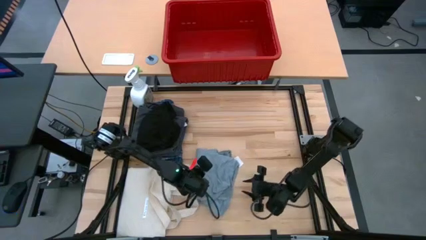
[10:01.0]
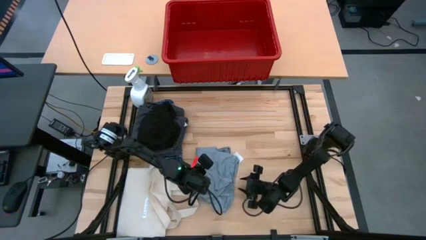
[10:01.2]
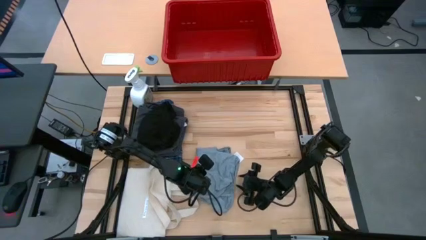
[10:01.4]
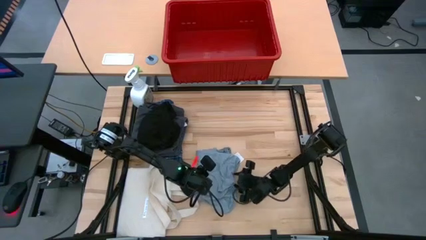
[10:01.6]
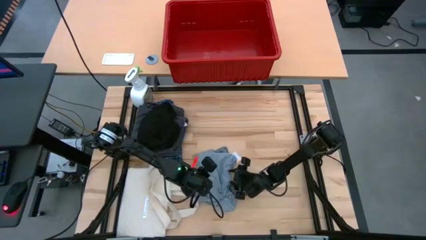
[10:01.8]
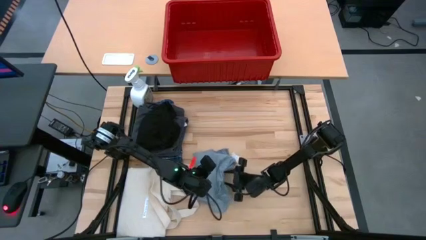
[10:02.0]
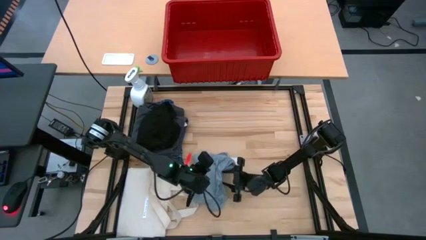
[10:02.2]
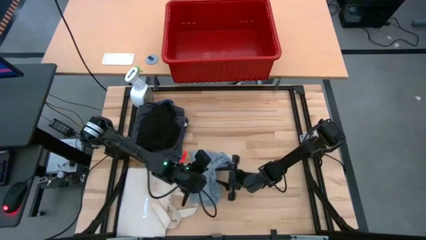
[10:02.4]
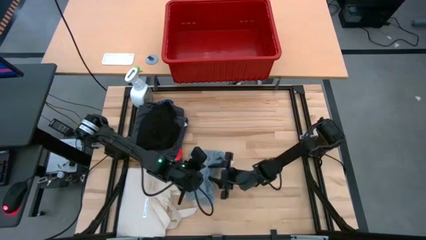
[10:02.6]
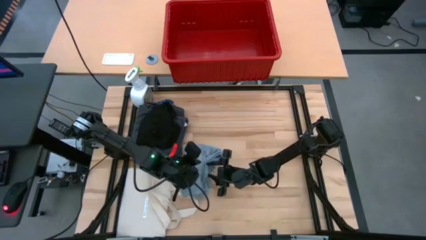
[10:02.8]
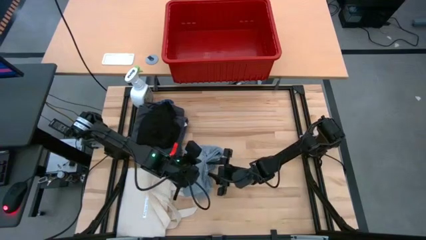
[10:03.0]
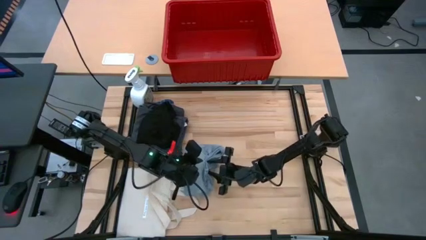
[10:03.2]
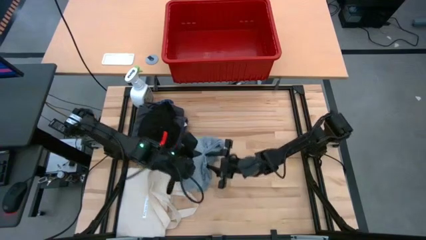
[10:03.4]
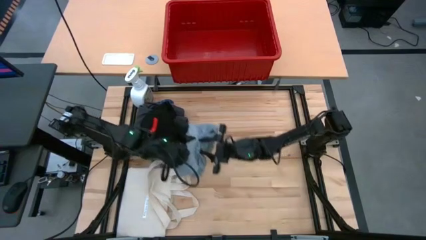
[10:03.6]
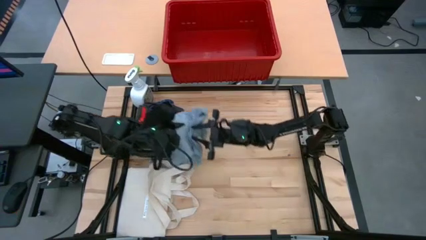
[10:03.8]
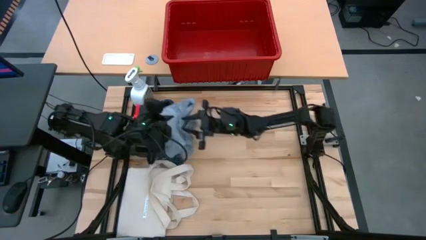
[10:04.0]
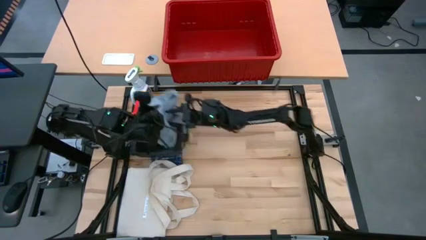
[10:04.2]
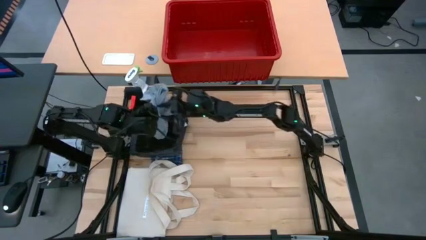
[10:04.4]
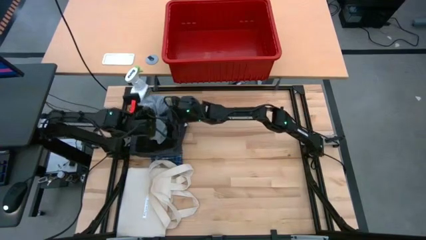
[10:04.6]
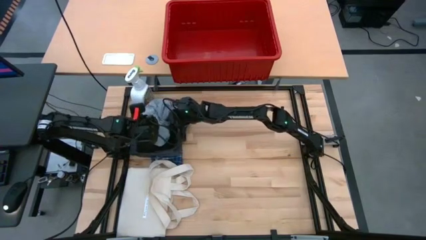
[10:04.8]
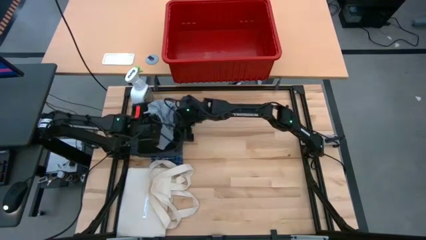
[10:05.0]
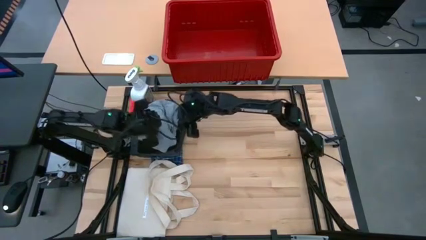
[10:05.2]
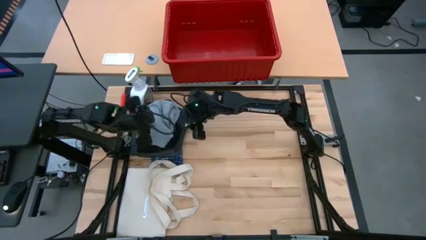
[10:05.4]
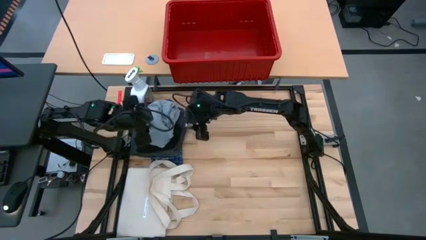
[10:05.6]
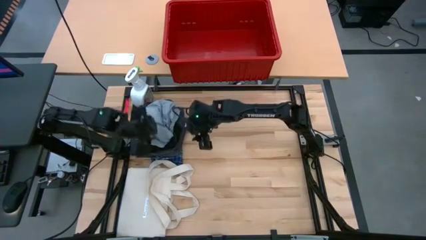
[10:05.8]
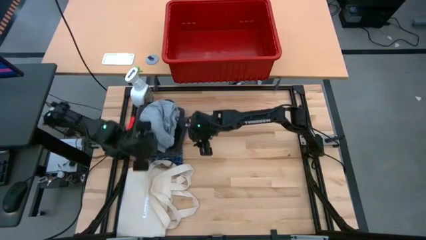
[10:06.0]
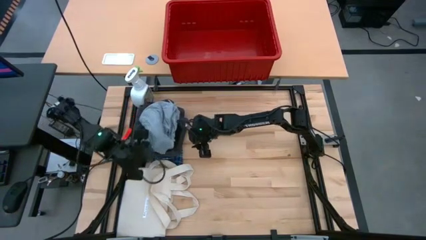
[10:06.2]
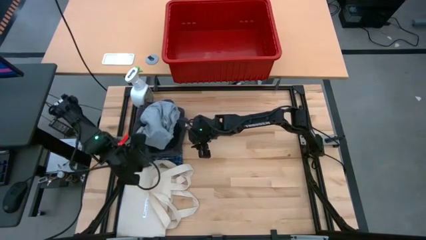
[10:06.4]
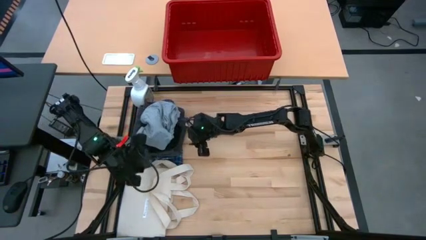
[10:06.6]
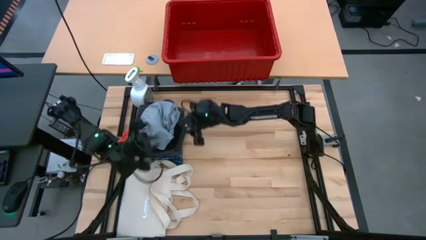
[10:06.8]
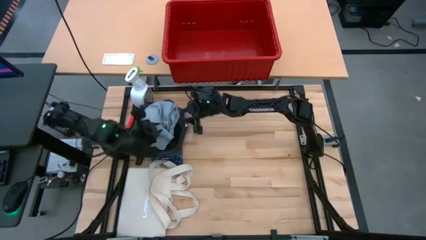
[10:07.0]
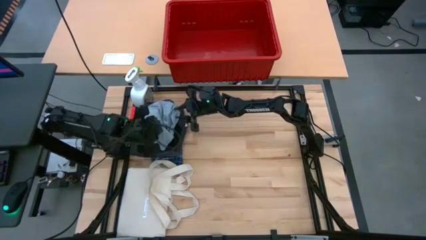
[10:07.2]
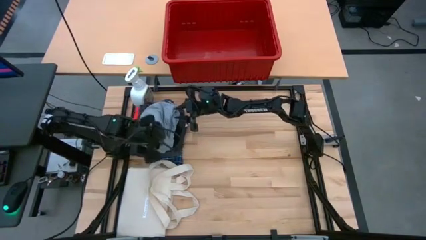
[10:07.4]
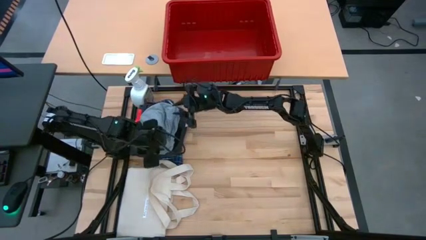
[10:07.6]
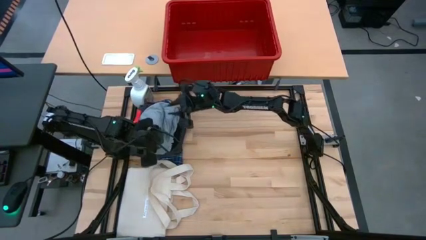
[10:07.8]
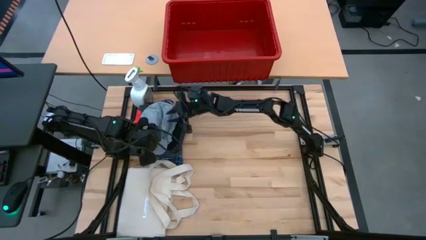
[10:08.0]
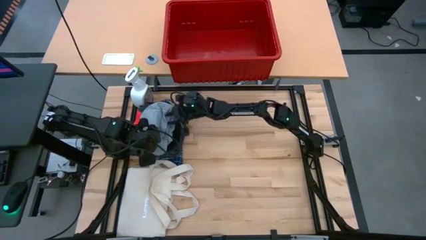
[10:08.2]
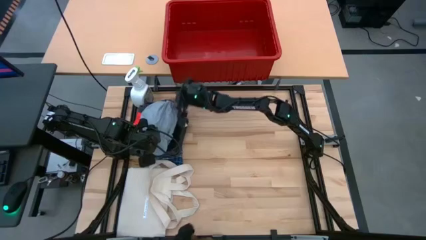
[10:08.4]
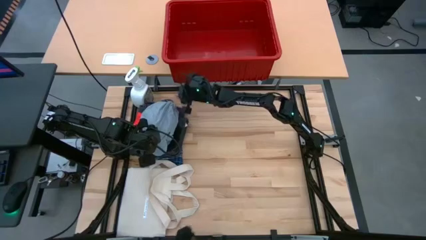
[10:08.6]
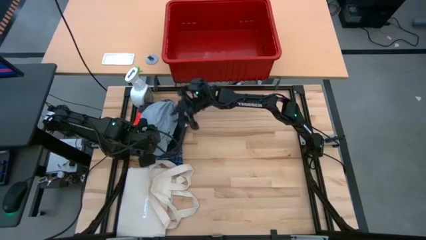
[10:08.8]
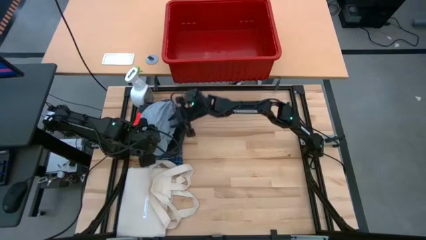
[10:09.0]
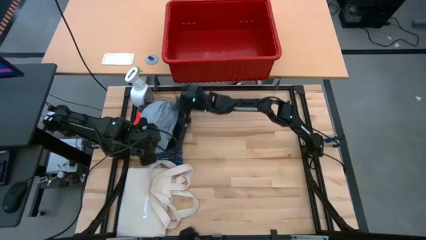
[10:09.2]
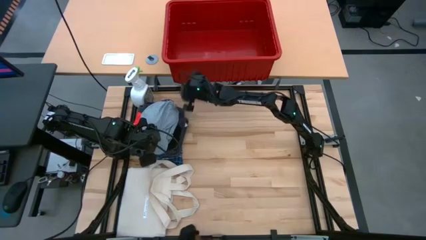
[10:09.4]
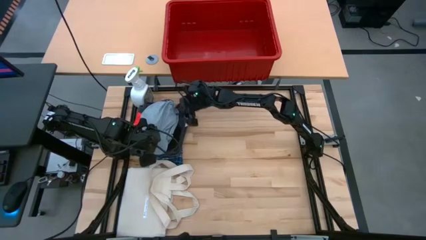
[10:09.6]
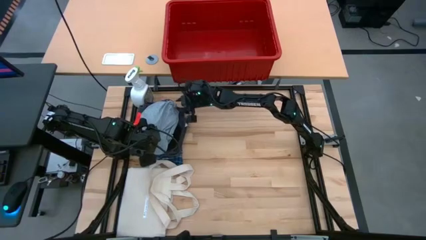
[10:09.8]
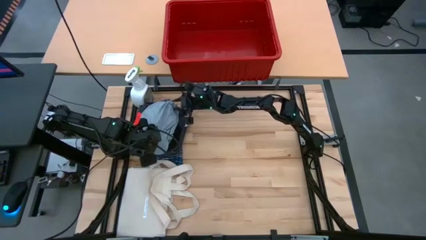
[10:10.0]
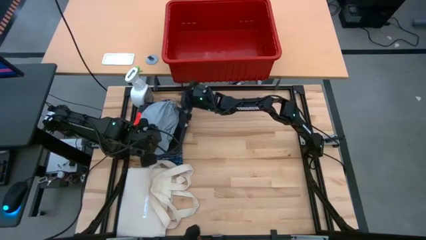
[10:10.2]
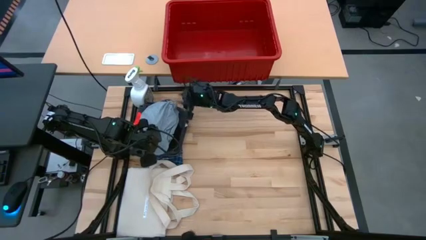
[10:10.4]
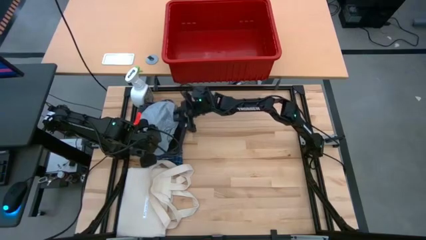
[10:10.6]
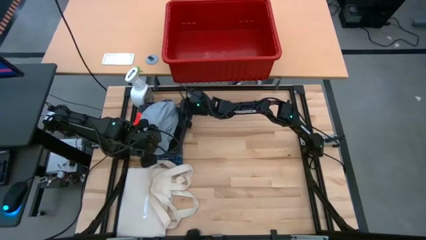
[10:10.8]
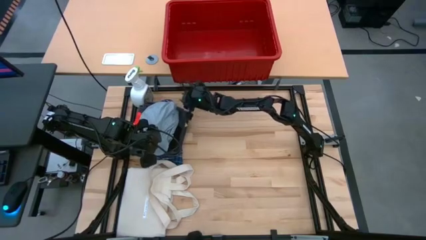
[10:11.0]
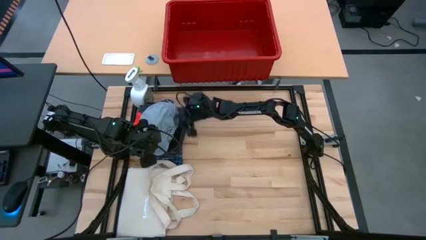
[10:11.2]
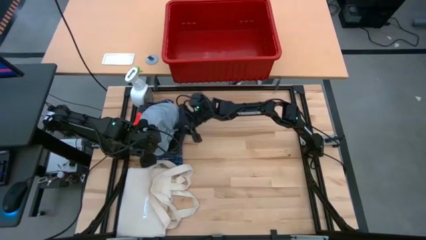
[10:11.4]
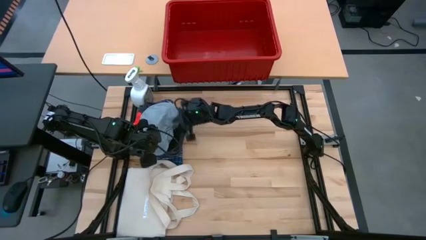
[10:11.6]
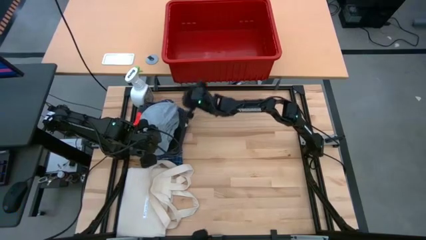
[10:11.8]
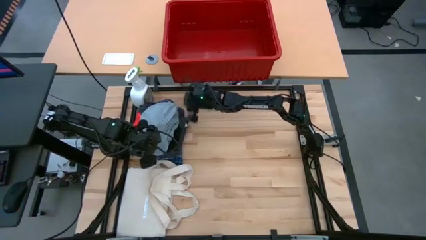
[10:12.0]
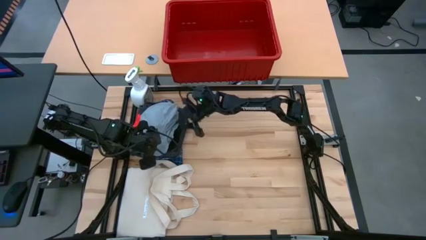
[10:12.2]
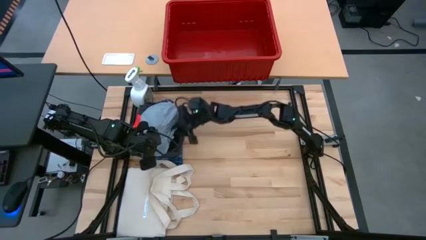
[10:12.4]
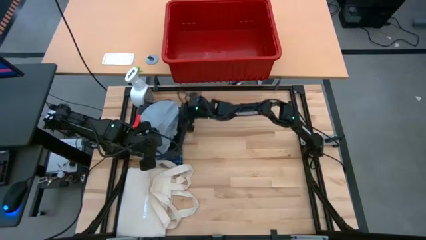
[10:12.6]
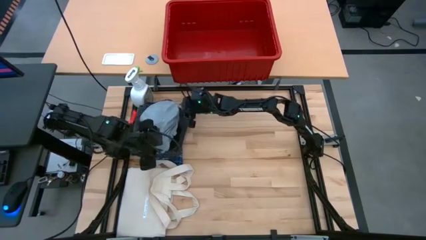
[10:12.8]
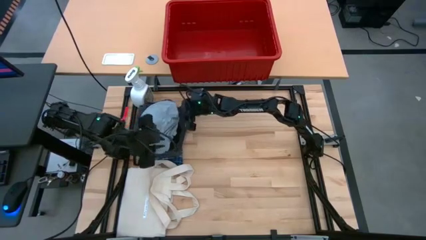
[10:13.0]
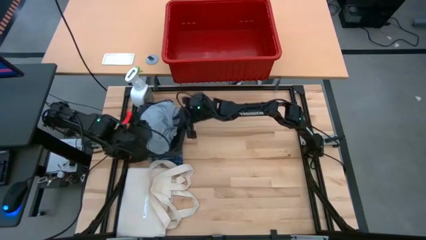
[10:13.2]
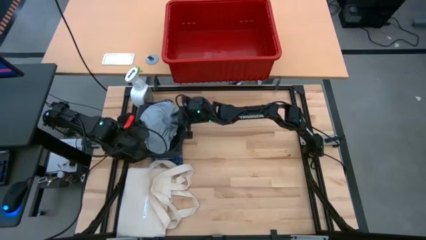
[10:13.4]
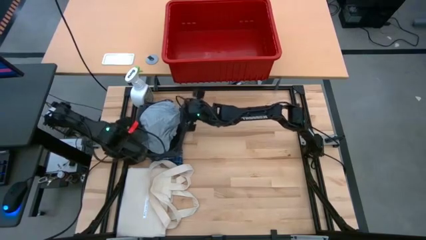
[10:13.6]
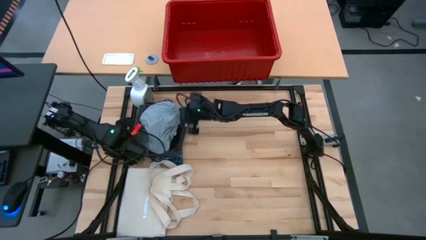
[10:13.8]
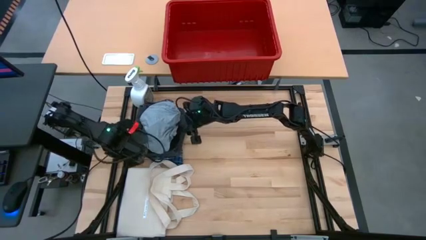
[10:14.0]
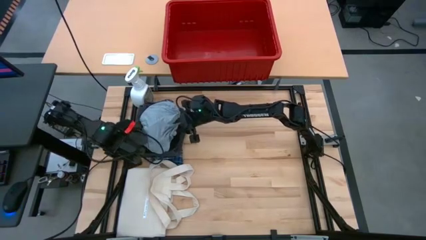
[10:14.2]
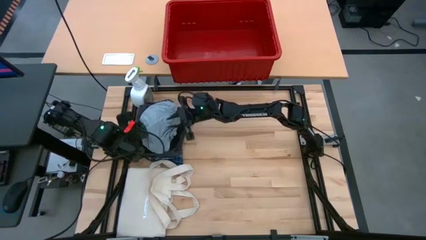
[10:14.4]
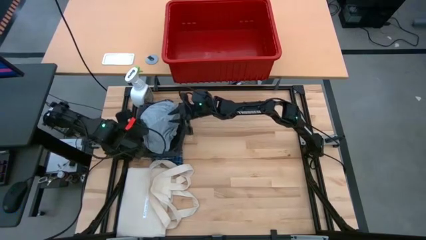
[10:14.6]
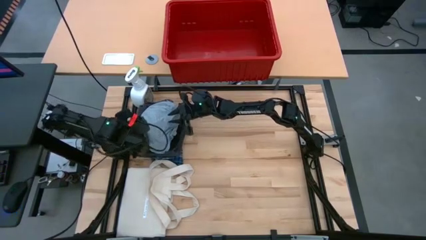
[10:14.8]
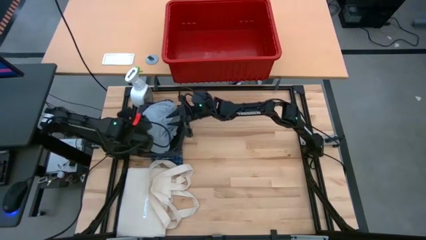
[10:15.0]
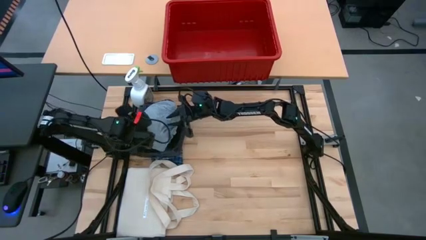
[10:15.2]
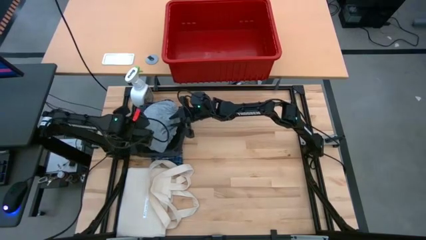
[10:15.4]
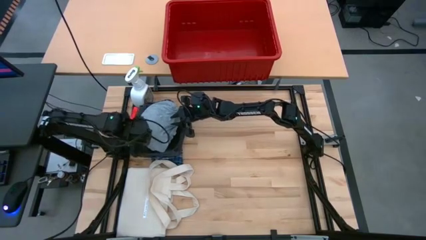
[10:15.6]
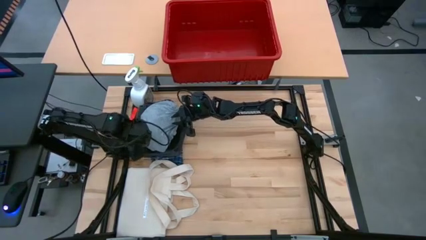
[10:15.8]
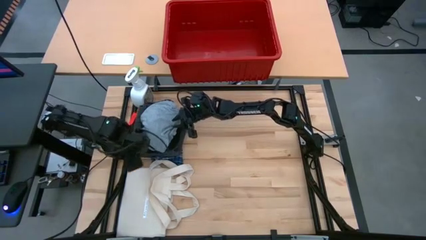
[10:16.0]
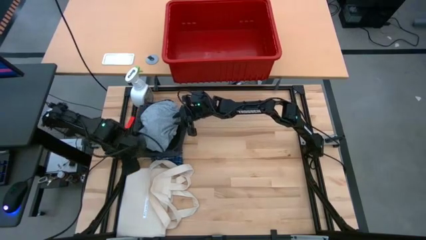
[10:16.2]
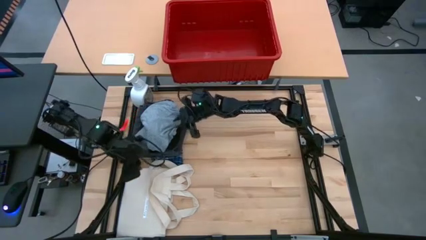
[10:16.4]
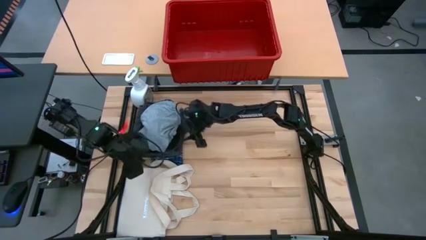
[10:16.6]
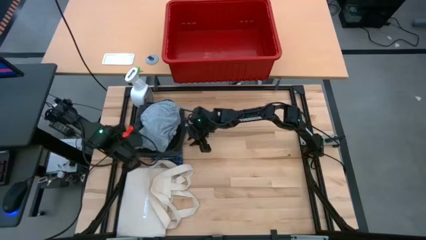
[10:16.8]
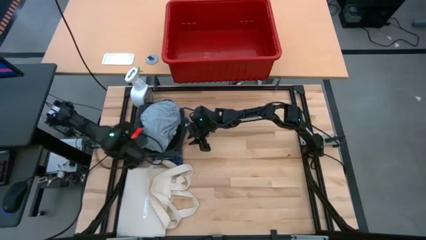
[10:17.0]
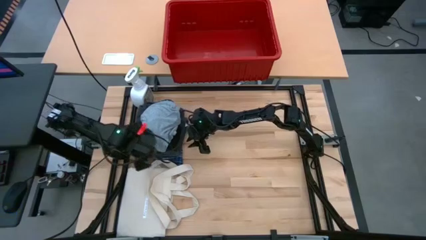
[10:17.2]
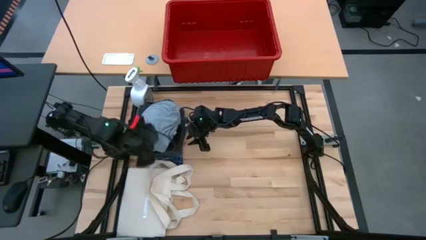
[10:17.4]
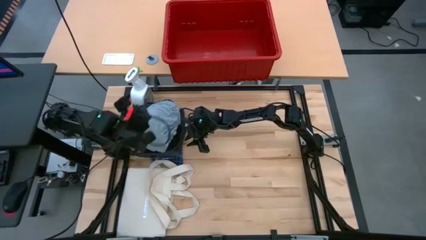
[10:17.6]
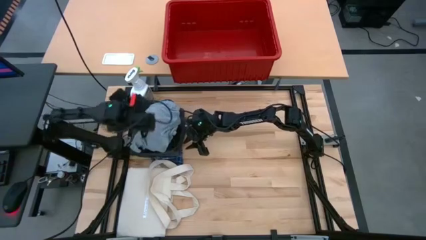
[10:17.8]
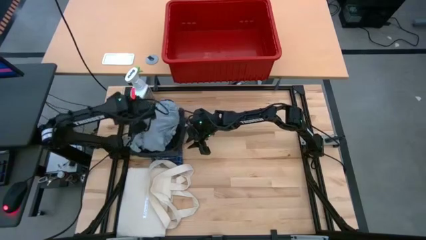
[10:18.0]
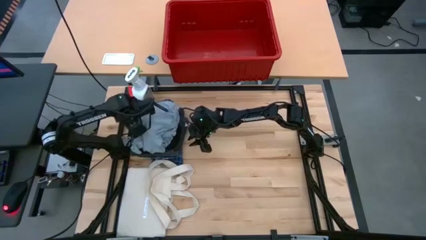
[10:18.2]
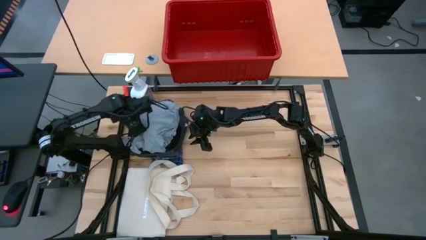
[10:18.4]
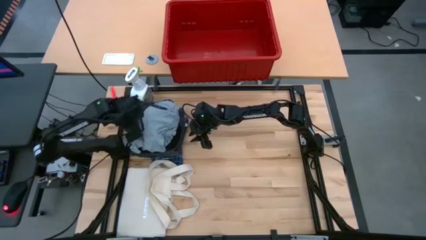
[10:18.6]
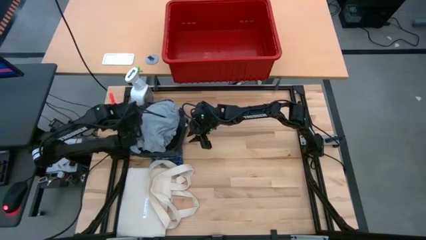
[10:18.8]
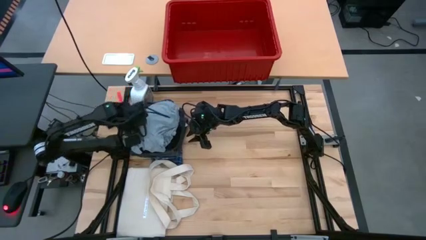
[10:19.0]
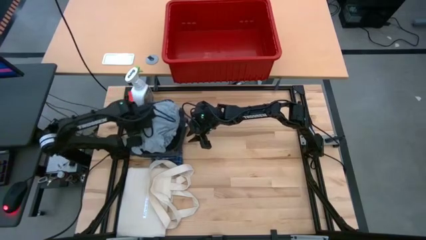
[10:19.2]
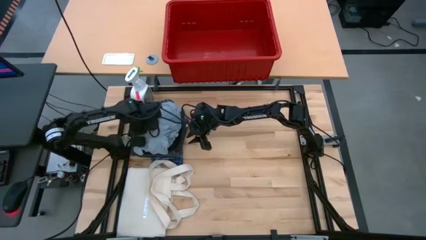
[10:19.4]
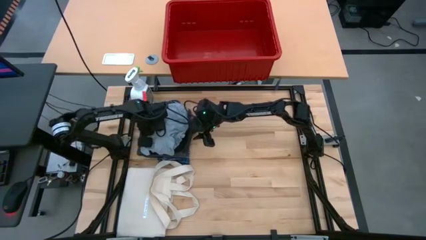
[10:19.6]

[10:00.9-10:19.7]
Task: Fold Laundry from Bin
Fold the gray shirt
